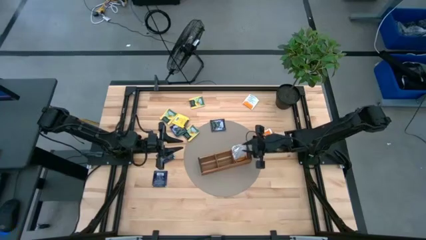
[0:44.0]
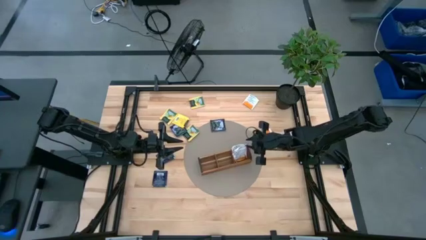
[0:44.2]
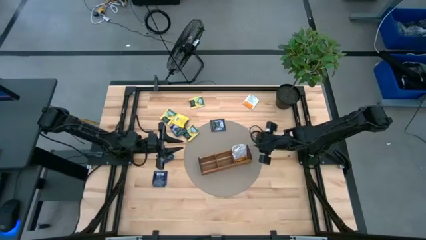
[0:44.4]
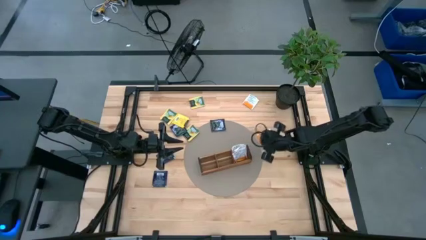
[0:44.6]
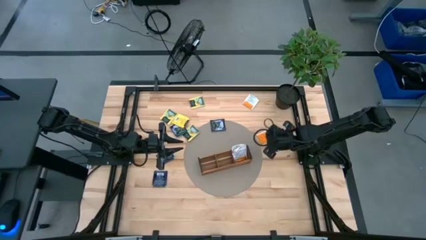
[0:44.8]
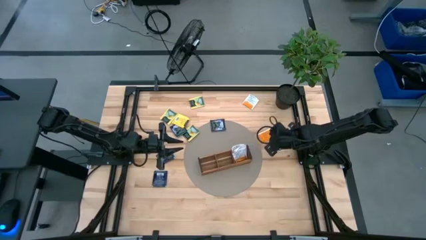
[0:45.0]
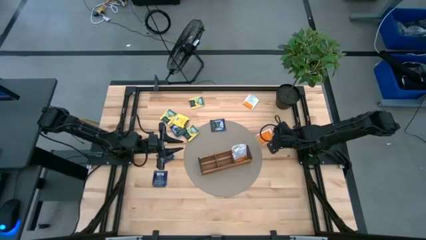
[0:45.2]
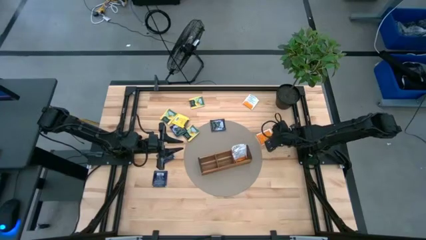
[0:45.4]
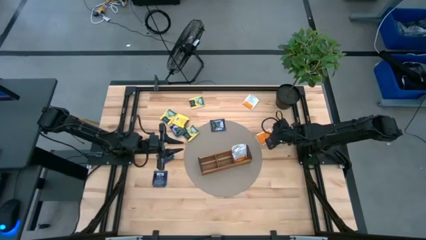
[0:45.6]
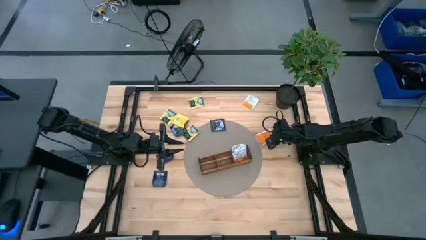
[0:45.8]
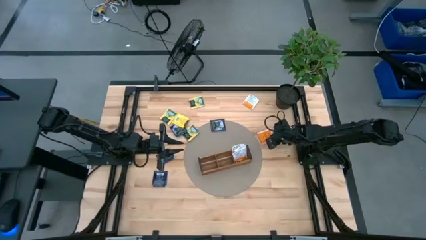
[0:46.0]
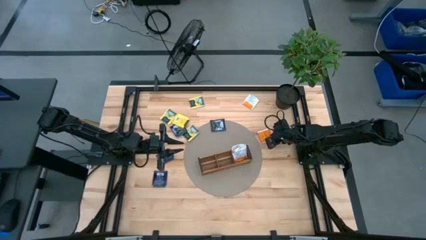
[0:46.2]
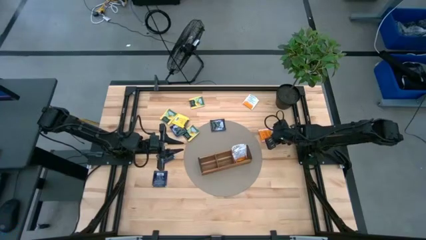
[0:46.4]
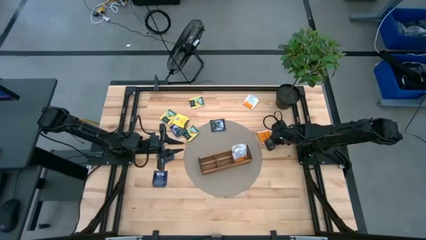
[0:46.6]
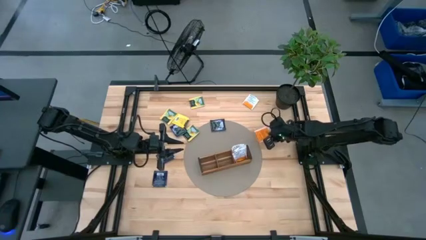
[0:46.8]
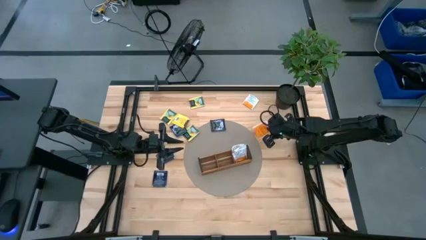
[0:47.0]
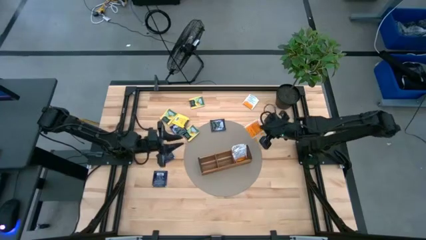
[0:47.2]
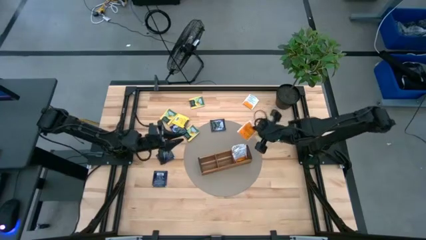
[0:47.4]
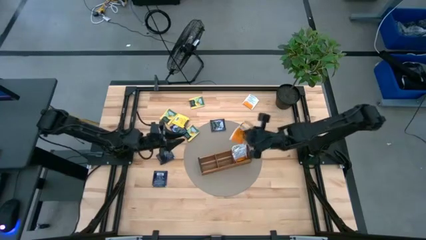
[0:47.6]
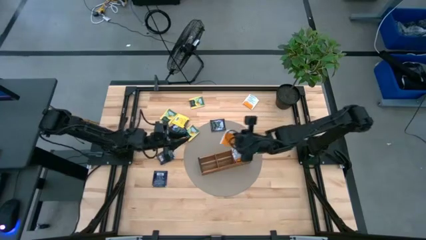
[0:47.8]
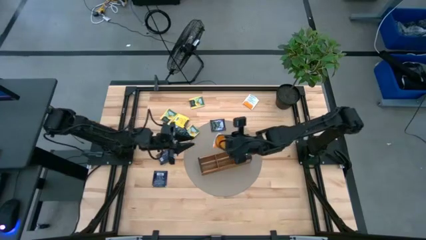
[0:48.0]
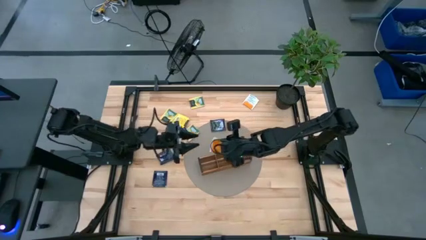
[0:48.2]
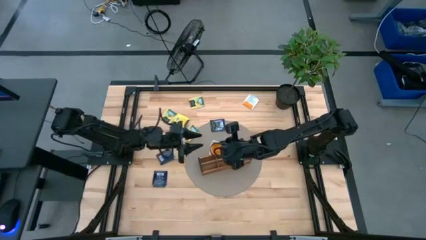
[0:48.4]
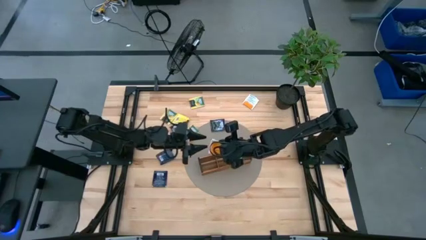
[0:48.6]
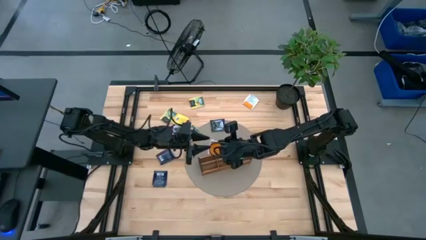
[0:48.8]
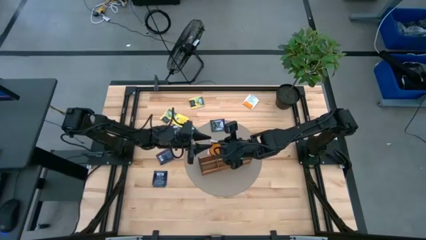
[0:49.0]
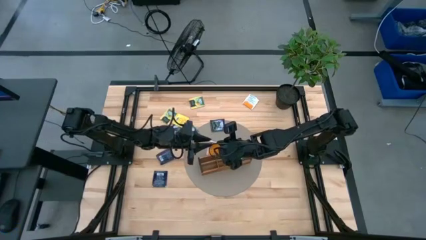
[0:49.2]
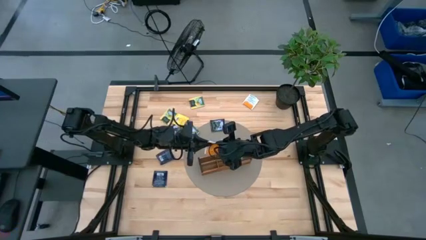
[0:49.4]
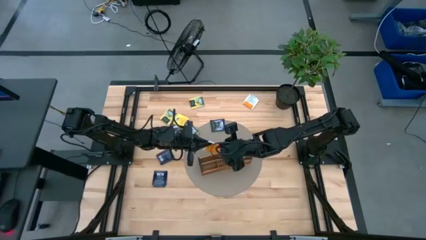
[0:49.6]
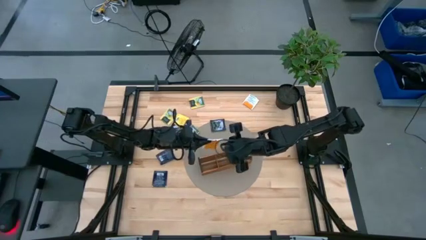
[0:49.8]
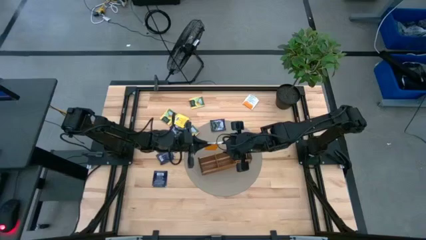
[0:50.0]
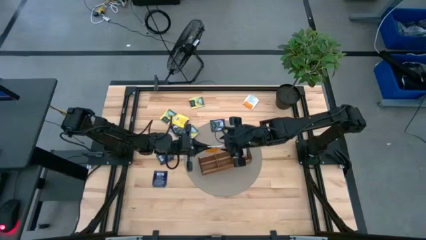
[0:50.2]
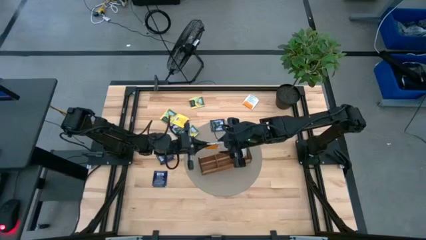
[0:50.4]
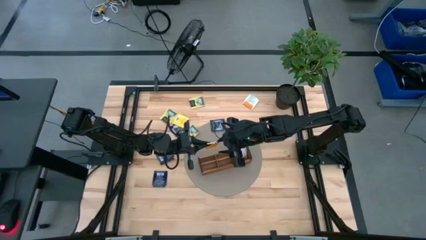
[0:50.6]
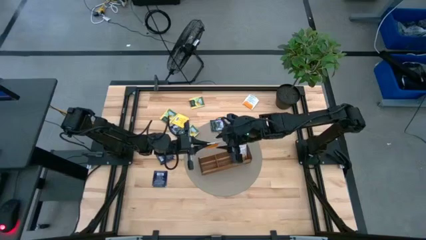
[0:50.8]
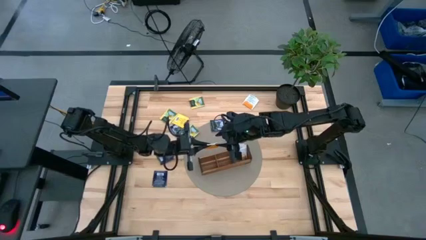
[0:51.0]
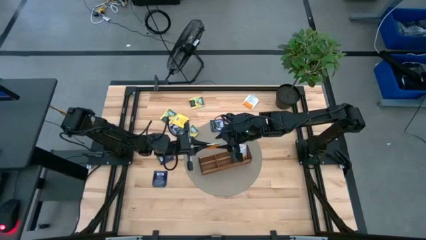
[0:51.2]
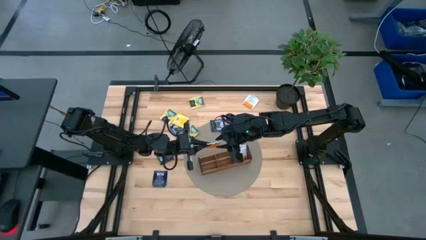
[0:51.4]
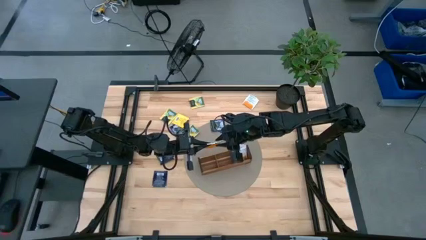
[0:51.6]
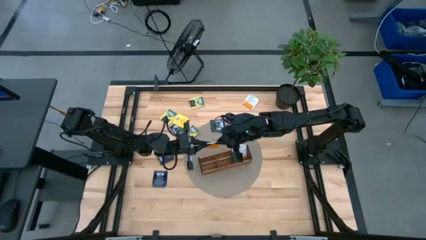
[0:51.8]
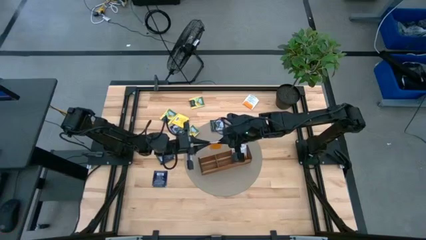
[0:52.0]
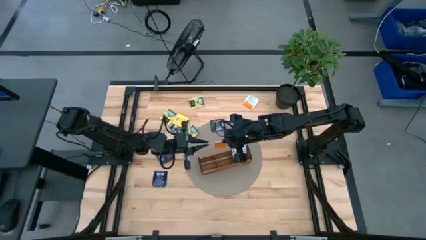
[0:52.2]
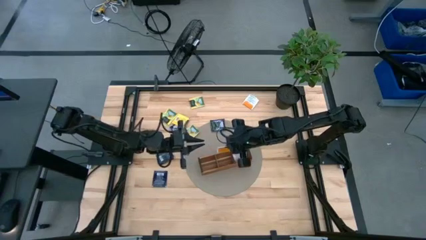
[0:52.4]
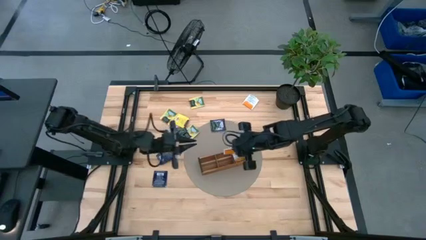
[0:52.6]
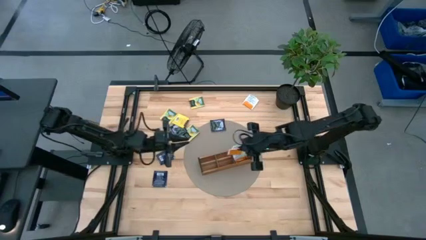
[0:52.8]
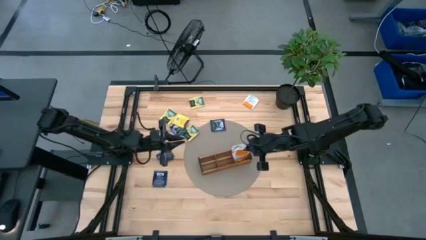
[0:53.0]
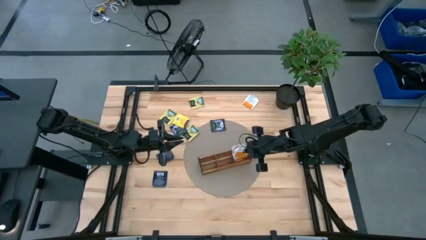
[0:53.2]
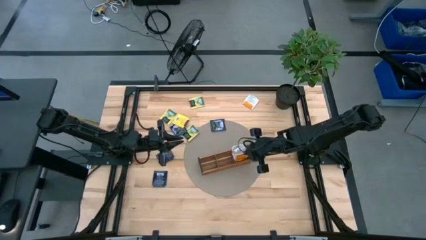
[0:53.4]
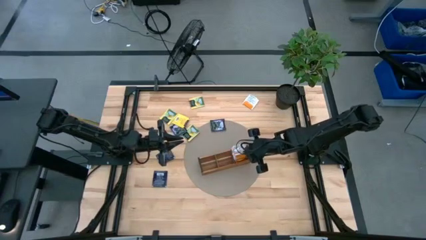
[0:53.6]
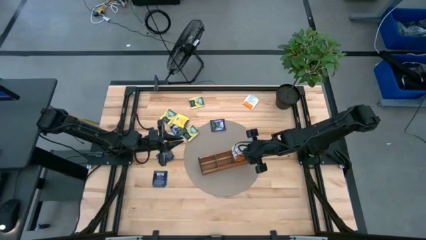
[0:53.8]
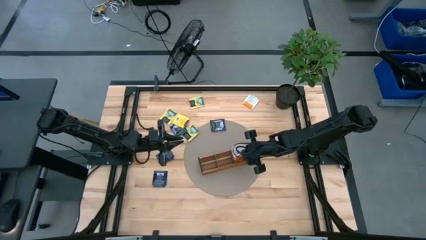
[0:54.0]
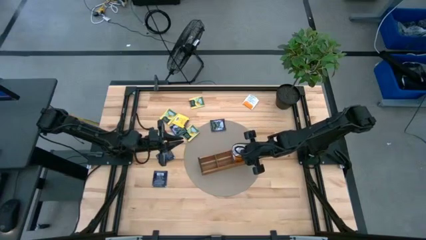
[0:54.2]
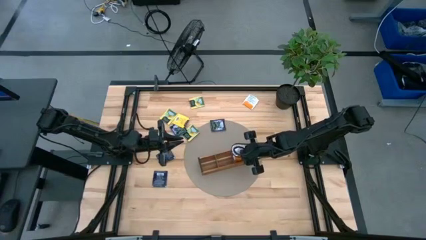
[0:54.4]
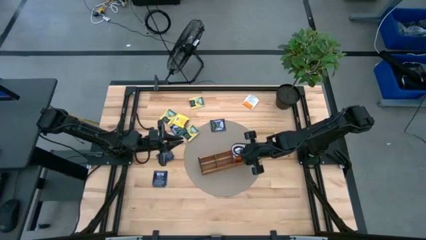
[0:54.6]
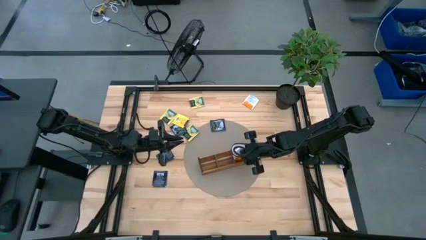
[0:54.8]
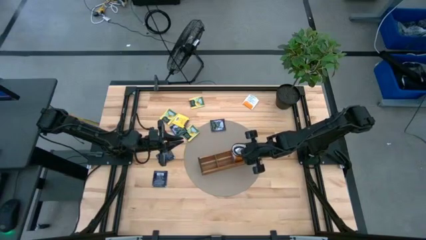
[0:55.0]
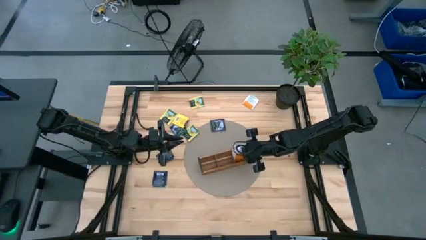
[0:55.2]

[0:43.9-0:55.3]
Task: Pick & Place Tea
Put the orange tea bag into the right section of the wooden organizer

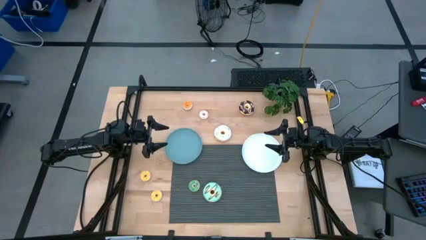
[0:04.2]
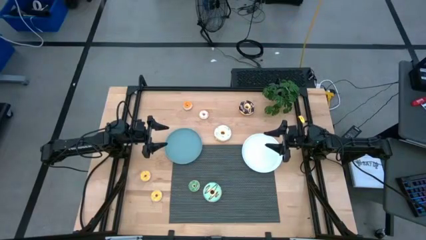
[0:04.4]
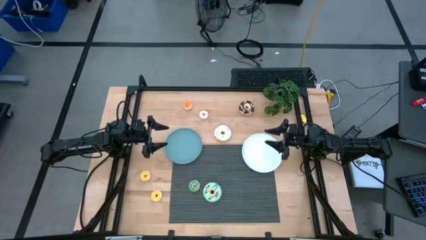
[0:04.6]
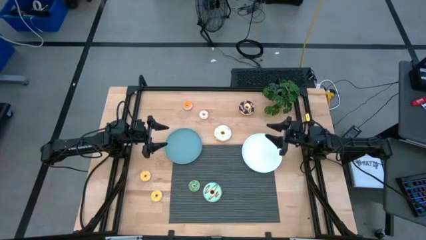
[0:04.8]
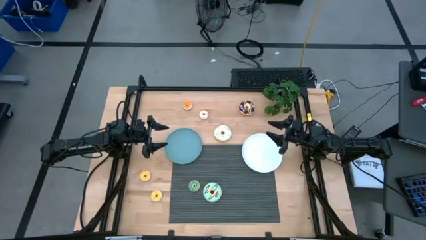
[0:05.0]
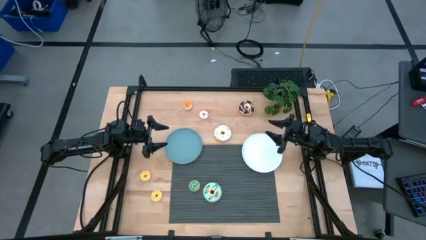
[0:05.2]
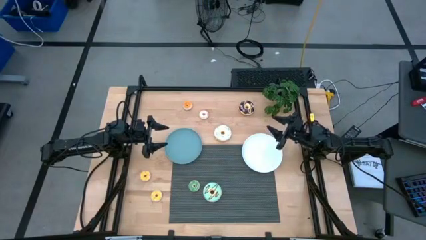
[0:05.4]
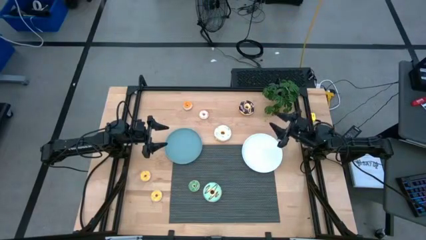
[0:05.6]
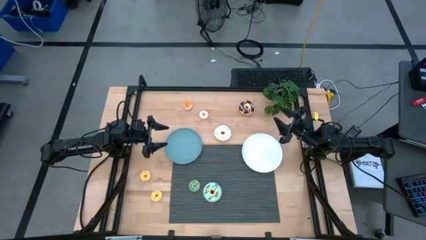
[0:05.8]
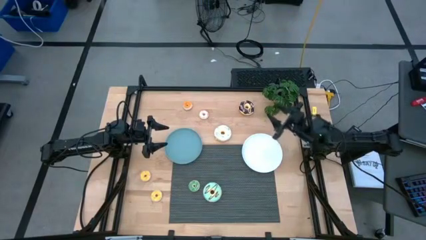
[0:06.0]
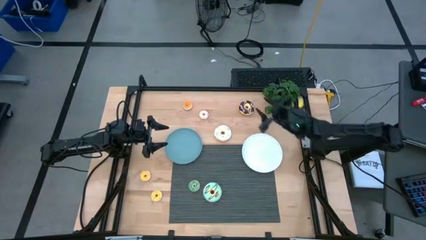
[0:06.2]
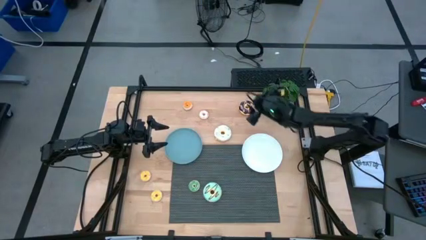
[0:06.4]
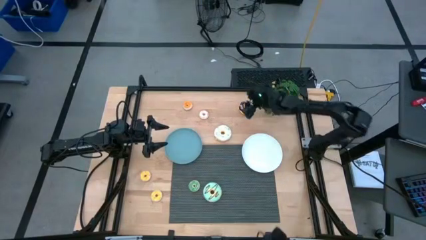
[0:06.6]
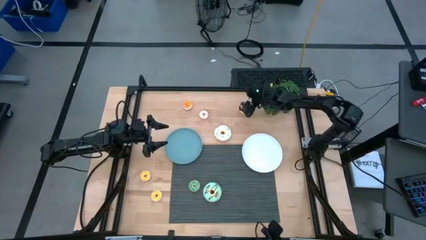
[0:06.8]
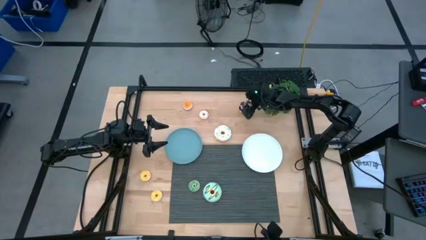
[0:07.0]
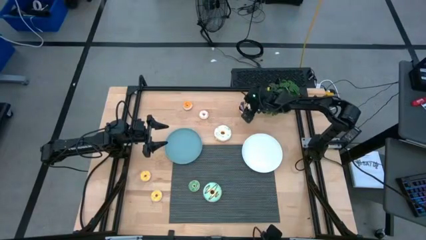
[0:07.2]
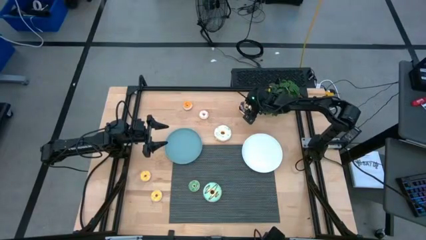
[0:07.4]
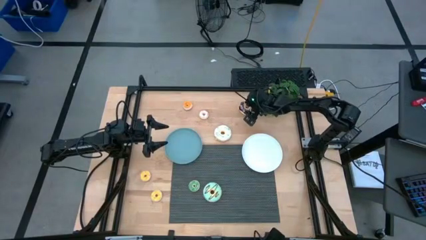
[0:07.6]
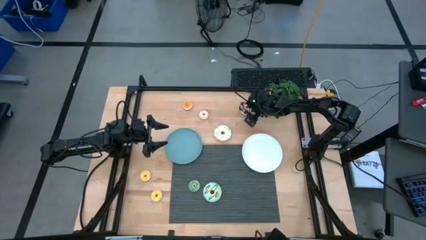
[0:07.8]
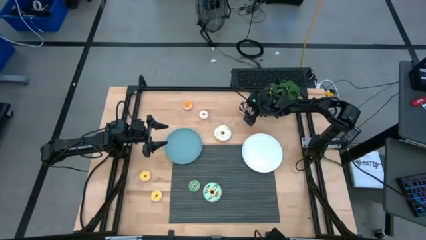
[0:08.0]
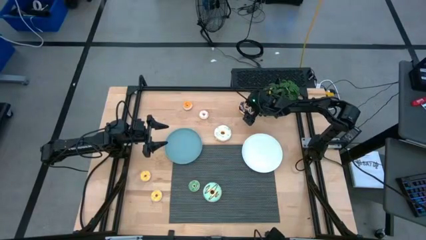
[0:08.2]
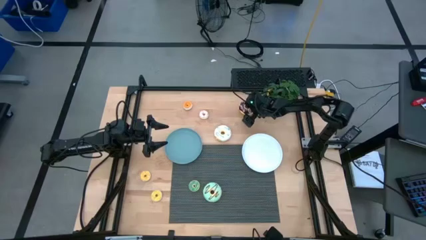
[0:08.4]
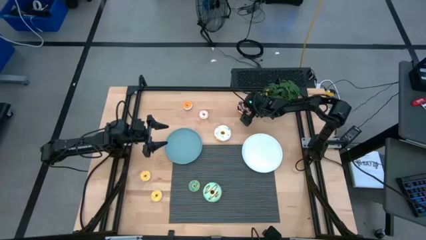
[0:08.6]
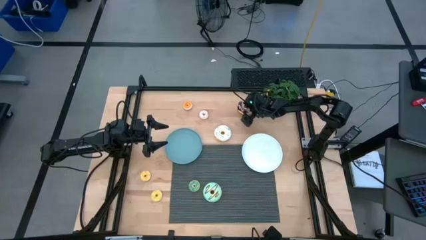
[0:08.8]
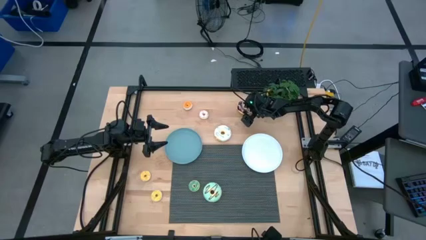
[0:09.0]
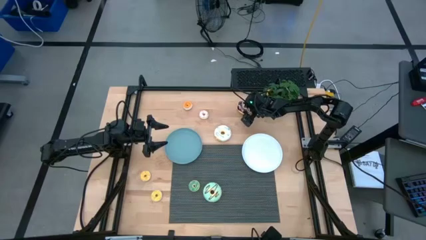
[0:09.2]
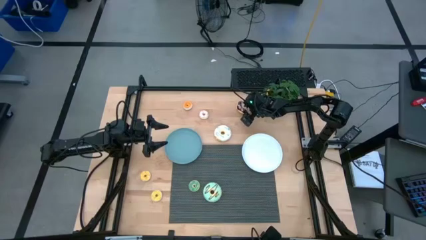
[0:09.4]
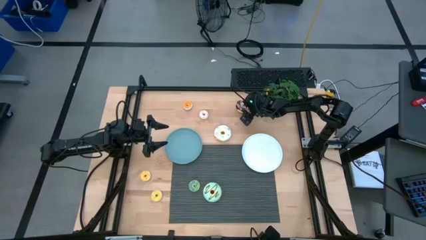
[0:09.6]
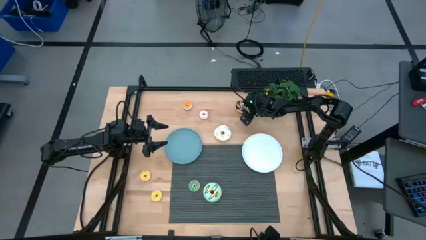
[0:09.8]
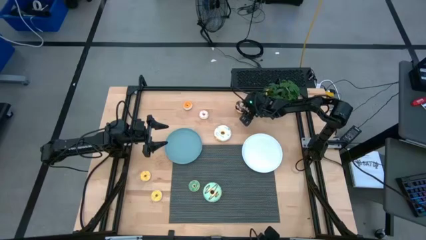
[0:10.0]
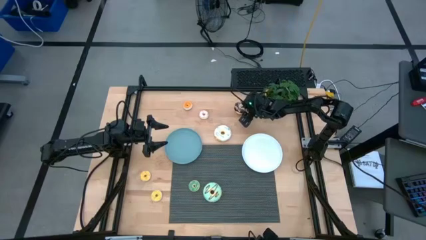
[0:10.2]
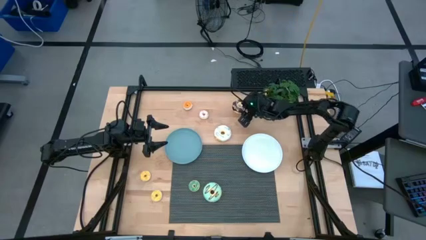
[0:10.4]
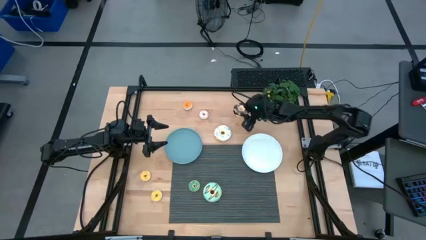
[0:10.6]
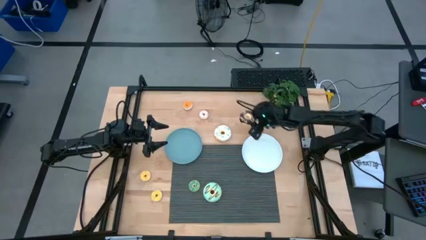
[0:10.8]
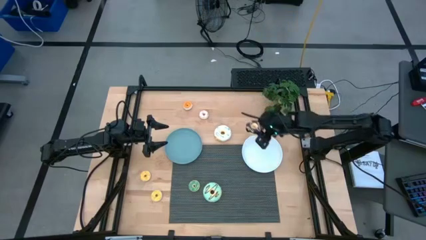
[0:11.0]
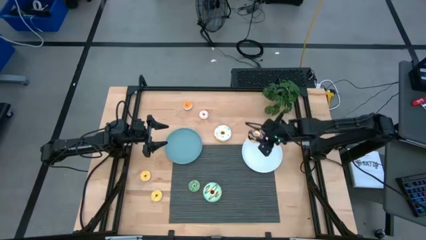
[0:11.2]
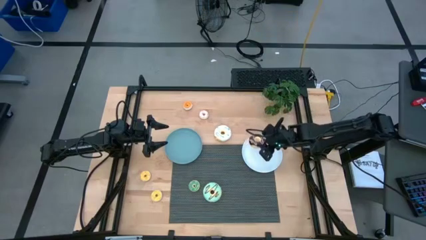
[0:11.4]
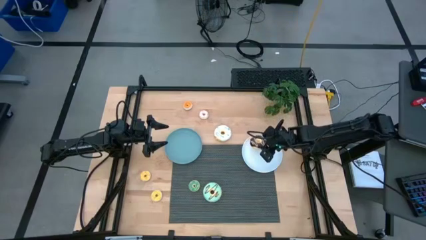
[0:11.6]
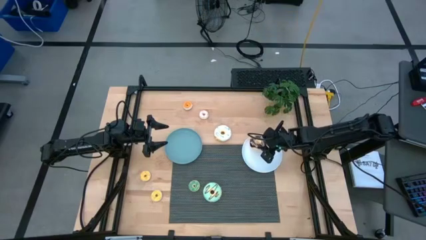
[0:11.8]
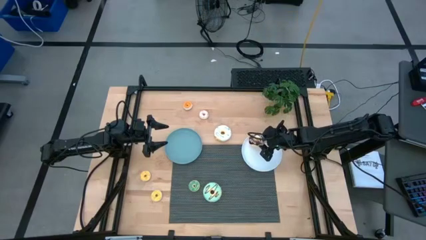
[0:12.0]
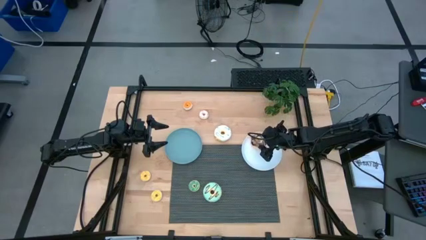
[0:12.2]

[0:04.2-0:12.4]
Task: Pick & Place donuts
Put the large black donut on the white plate
